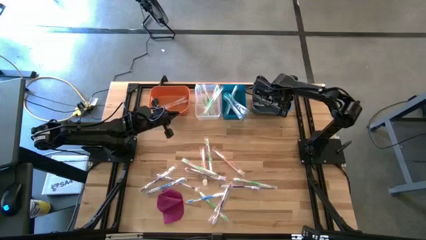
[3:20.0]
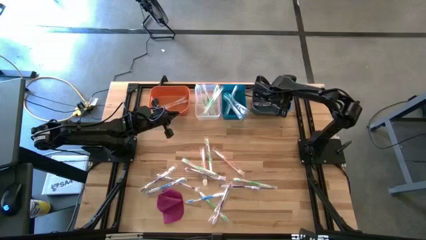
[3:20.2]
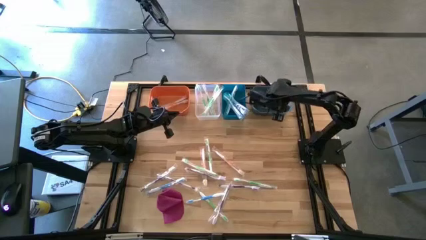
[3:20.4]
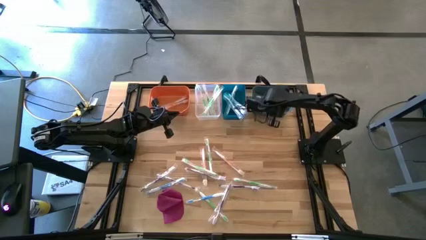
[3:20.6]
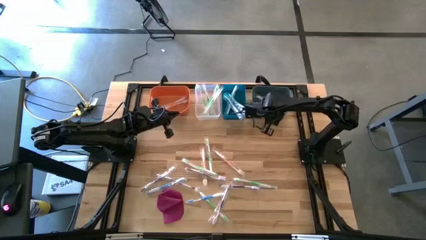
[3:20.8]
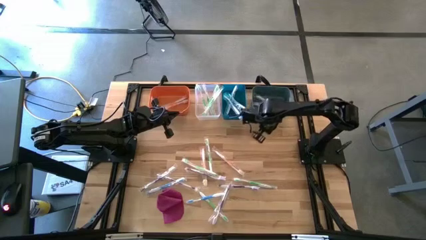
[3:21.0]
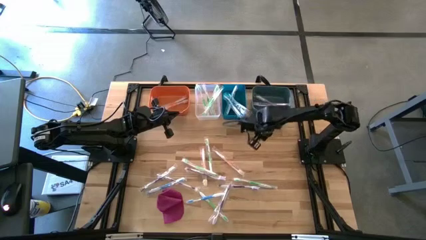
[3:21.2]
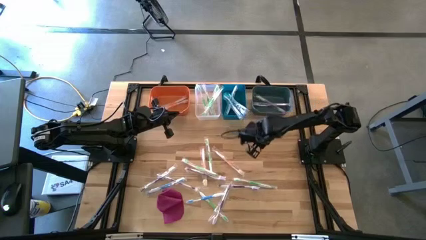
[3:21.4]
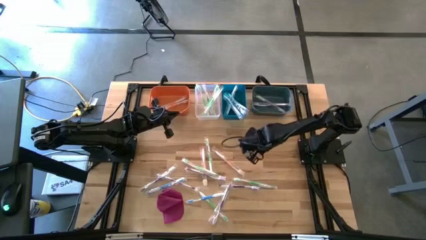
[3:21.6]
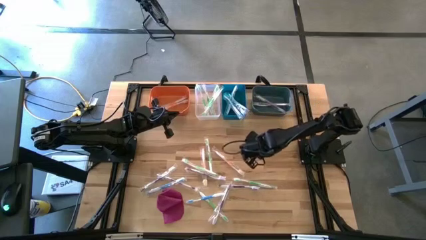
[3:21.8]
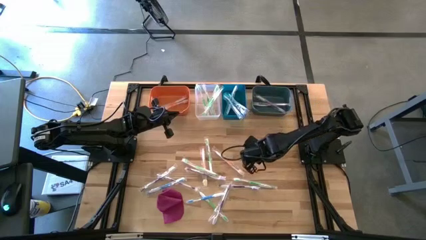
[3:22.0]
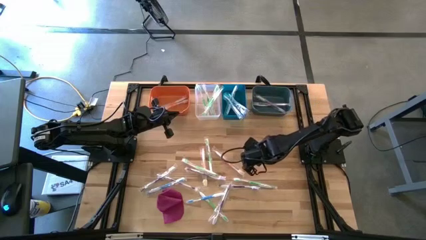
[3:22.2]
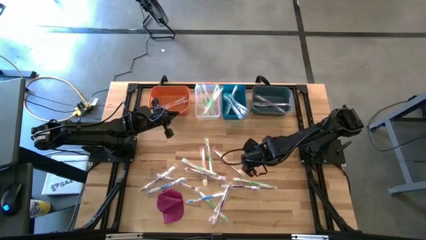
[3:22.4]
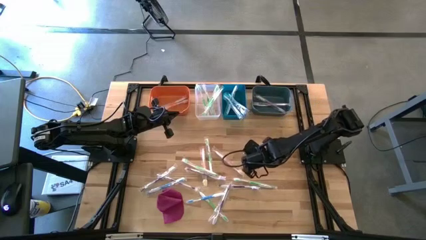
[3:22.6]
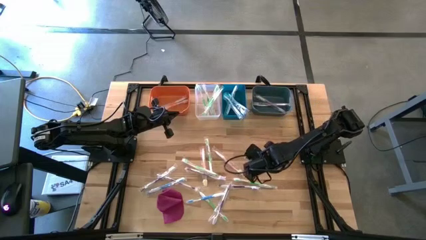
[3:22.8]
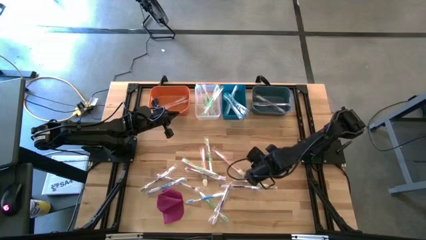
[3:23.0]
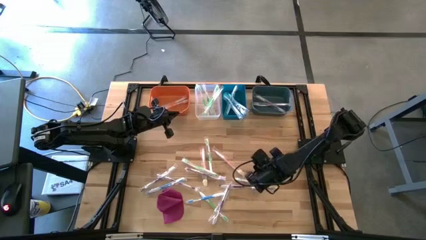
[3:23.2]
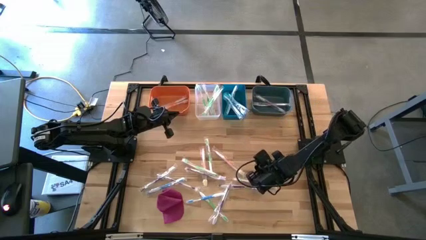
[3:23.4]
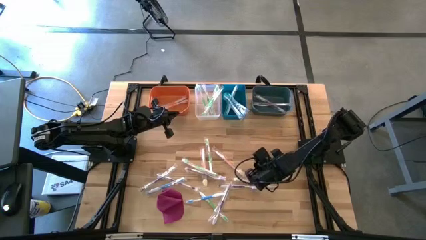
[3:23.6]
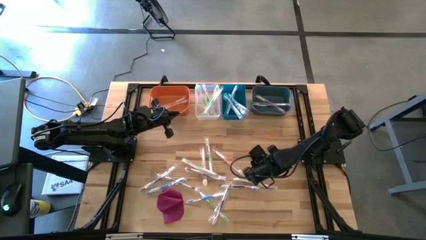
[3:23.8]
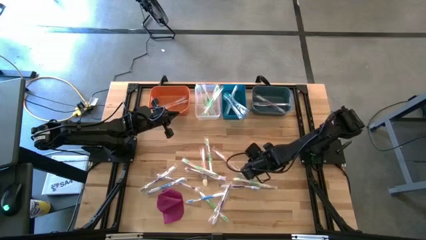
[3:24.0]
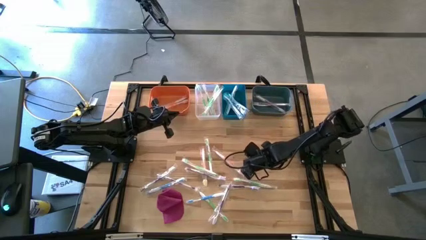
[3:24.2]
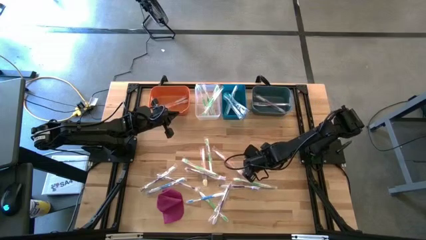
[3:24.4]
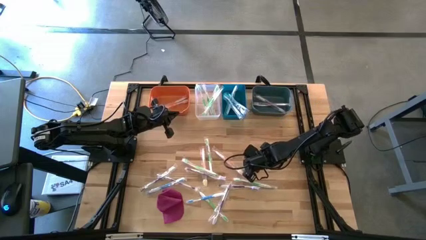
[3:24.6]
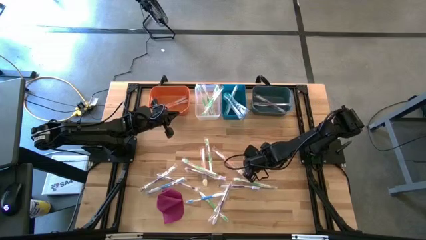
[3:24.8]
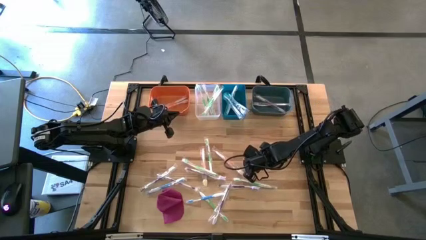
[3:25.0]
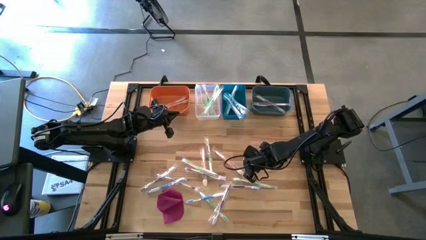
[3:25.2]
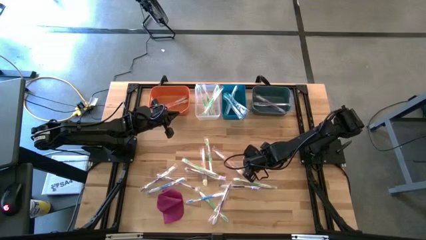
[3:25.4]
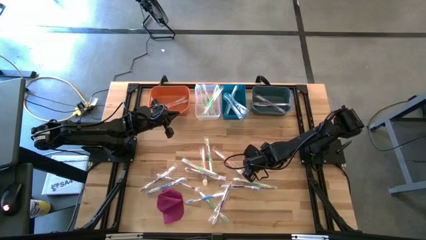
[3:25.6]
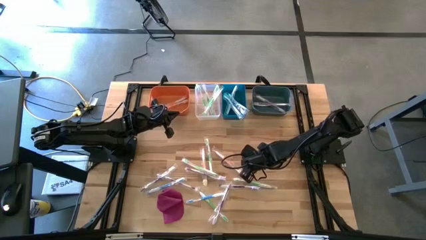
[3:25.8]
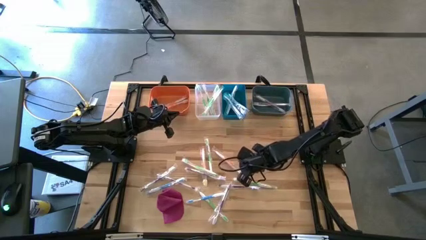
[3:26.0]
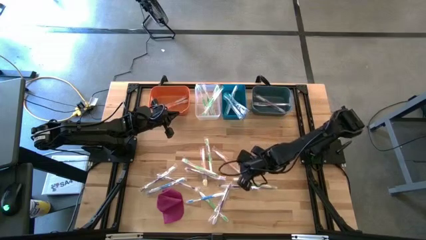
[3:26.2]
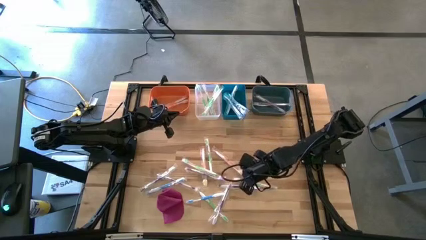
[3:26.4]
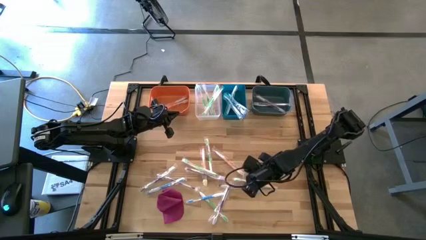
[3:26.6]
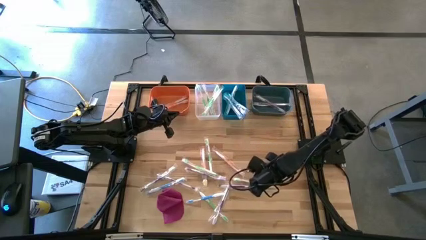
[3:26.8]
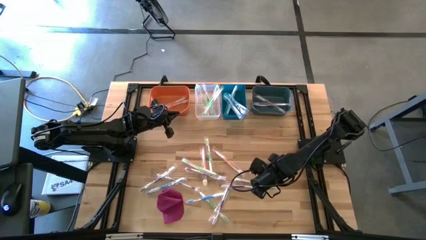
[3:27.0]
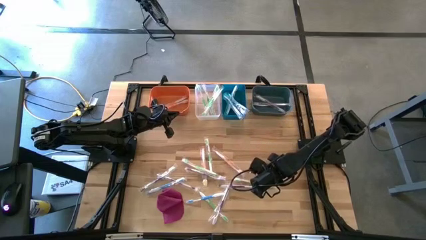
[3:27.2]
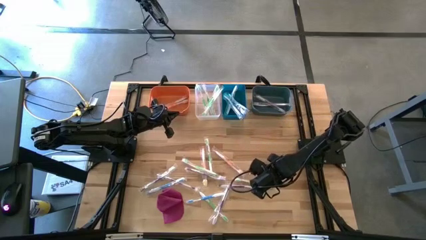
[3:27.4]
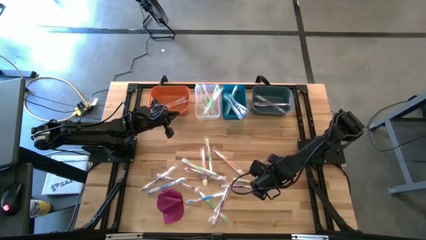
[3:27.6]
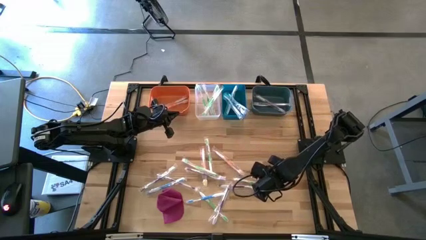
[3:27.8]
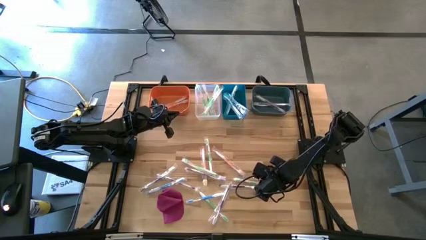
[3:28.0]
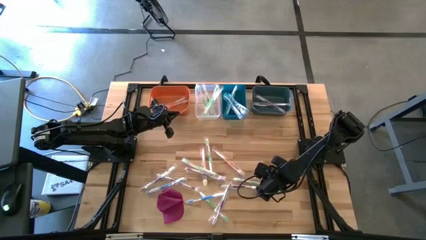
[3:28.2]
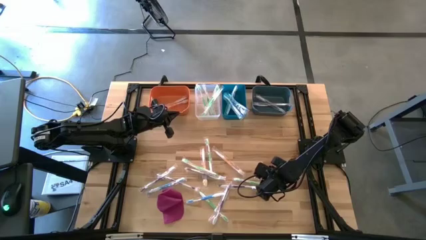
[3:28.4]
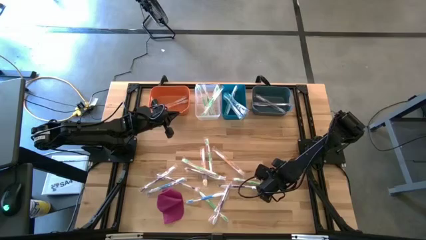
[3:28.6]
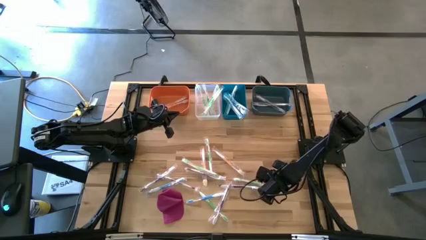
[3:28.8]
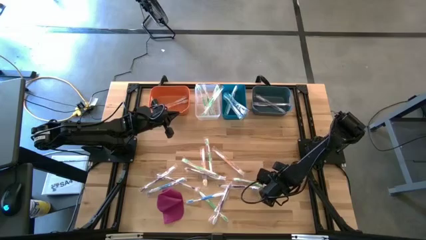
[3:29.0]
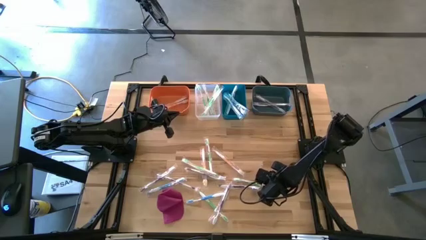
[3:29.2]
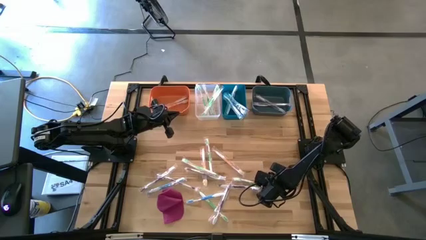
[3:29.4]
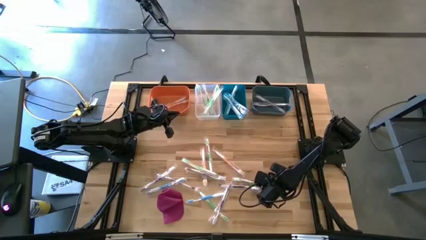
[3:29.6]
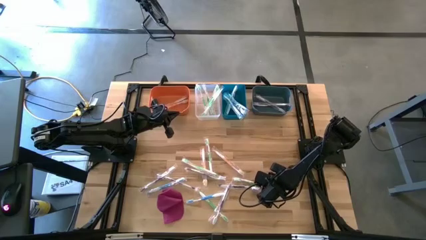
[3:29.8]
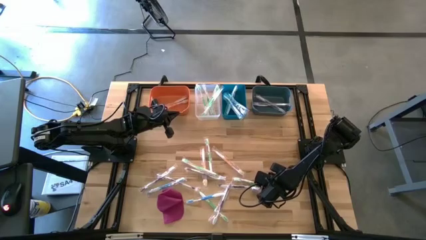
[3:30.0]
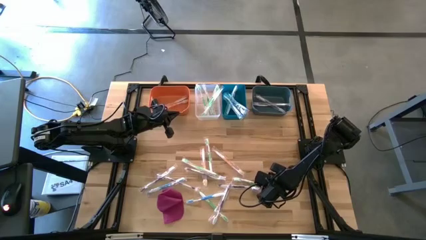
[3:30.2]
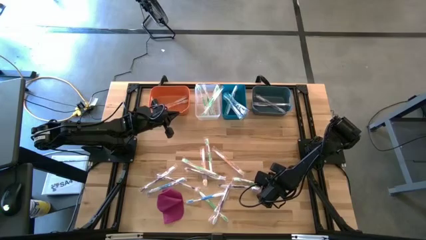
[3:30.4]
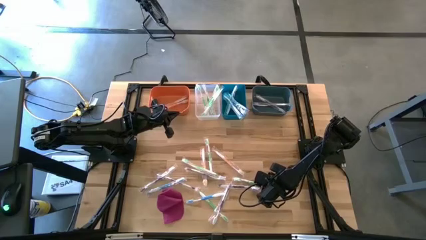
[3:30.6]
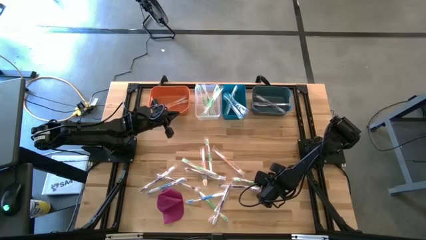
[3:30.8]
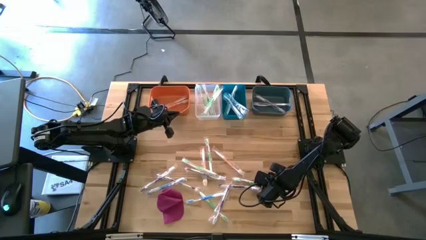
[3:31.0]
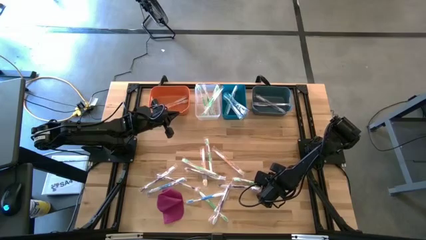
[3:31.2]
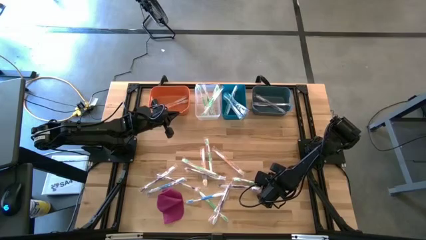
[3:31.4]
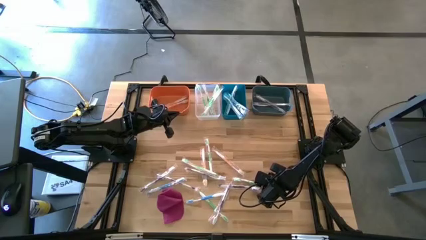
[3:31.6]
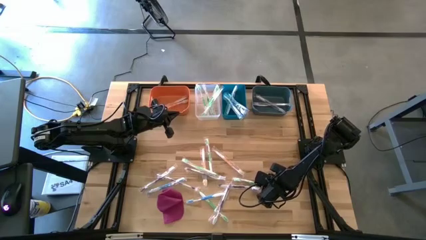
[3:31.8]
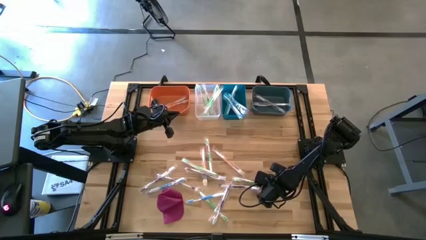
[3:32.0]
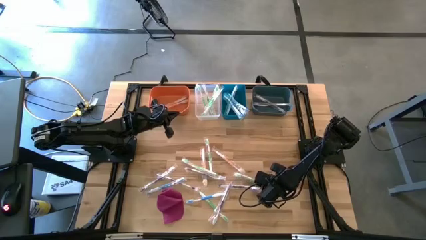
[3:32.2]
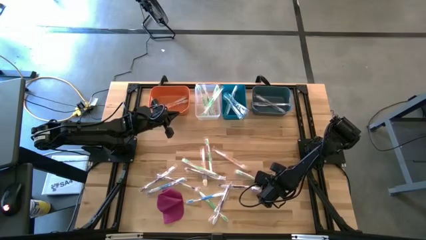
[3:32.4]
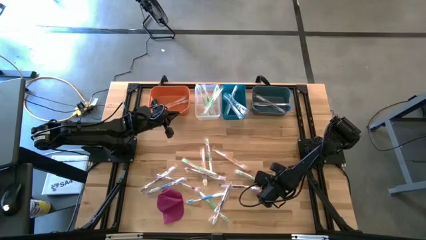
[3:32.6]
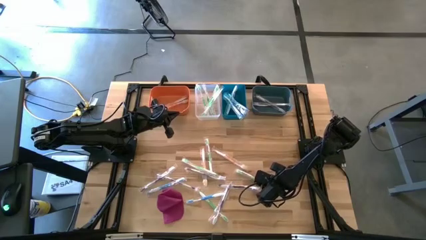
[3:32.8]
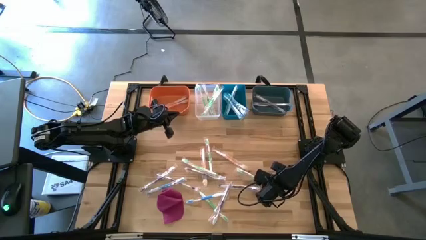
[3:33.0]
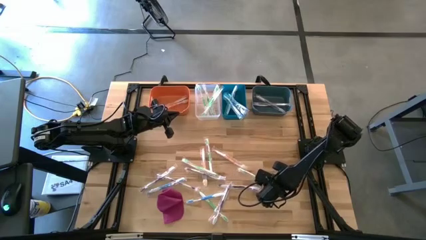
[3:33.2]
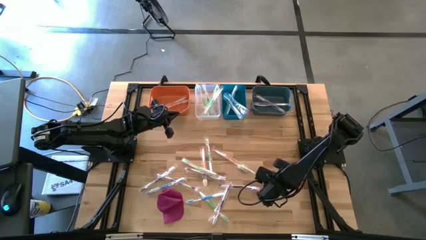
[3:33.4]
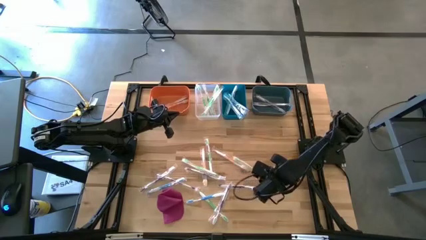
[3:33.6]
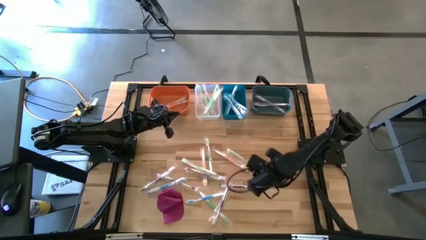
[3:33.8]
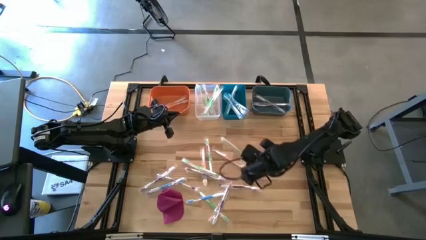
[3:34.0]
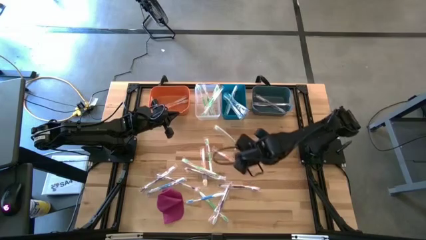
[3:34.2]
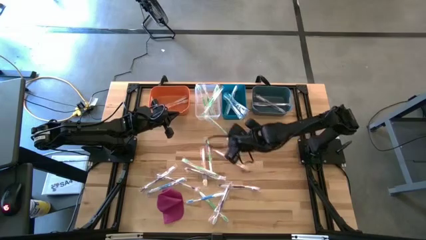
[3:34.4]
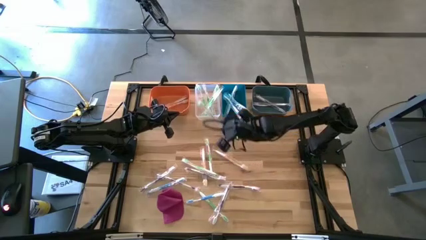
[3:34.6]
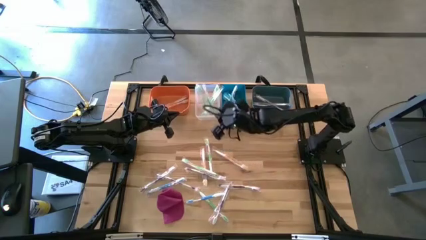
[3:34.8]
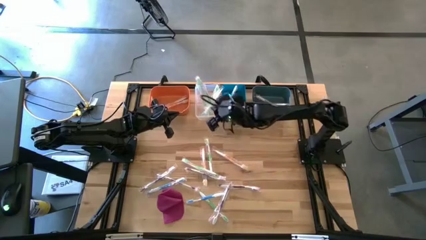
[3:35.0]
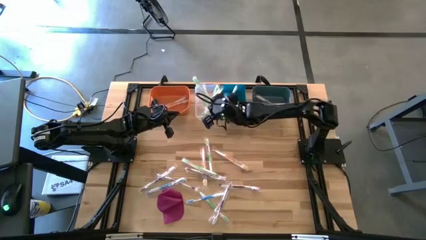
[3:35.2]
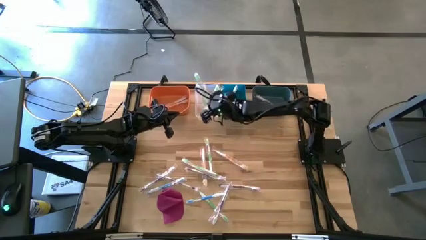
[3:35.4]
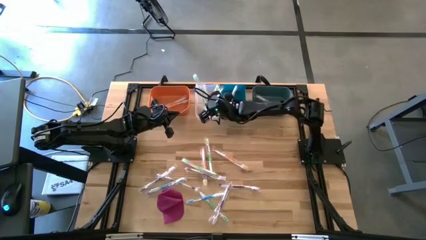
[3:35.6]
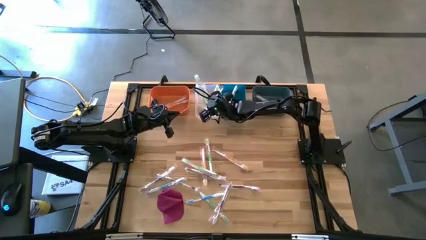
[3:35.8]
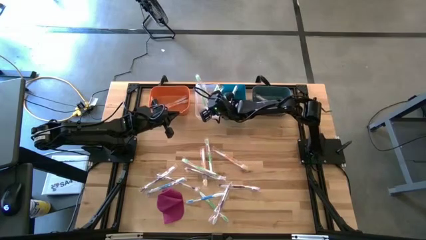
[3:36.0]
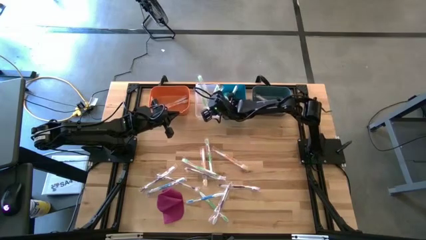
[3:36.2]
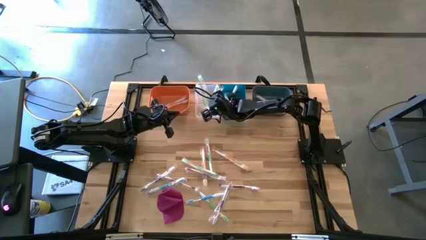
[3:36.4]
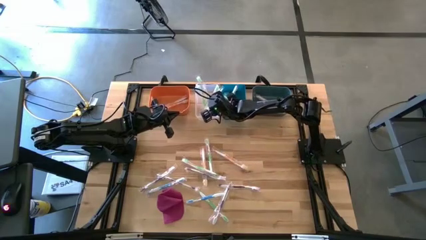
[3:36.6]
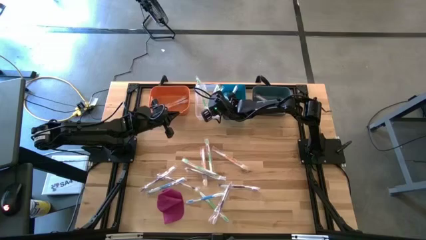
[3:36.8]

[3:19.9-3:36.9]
Task: Pick & Place Toothbrushes
Put the green toothbrush into the transparent bin
